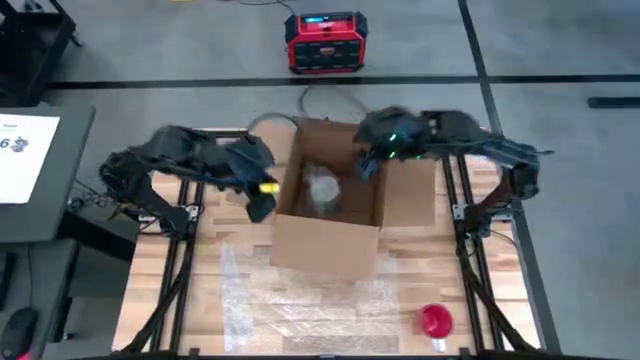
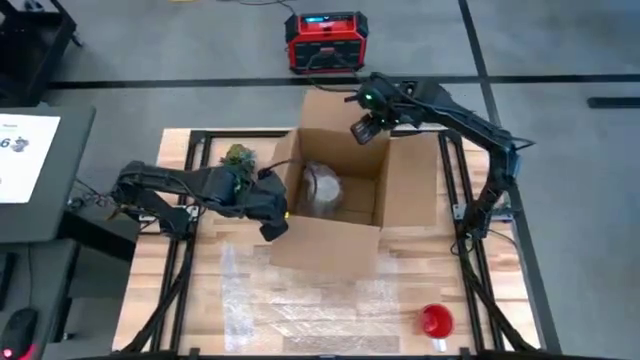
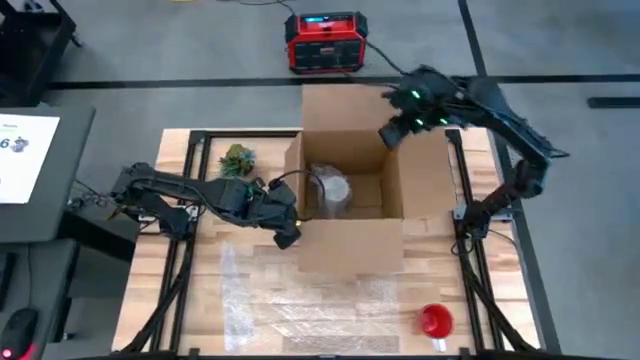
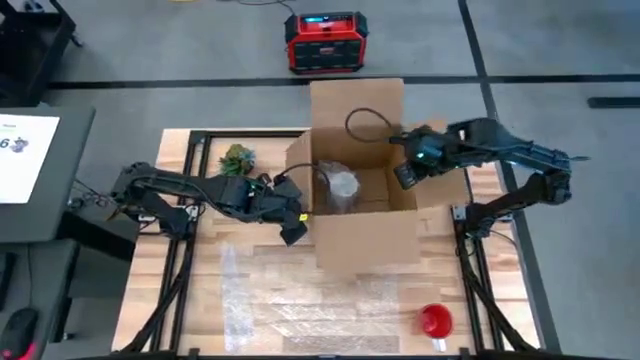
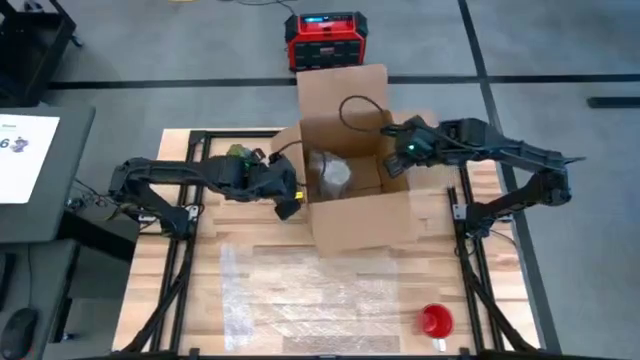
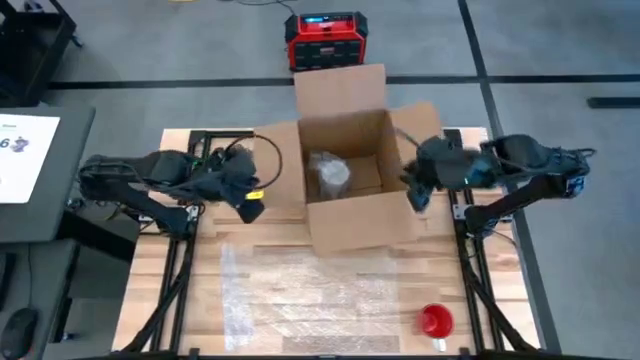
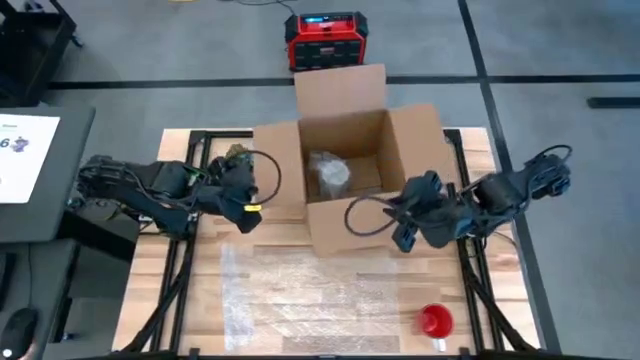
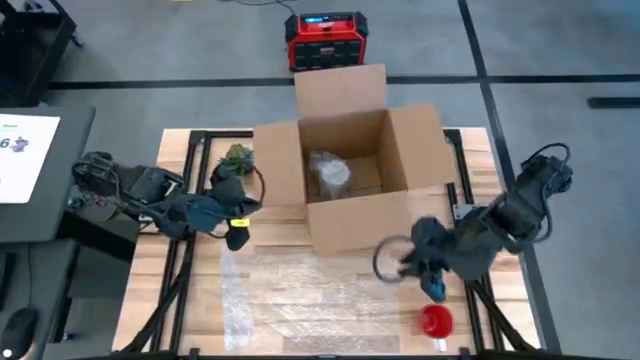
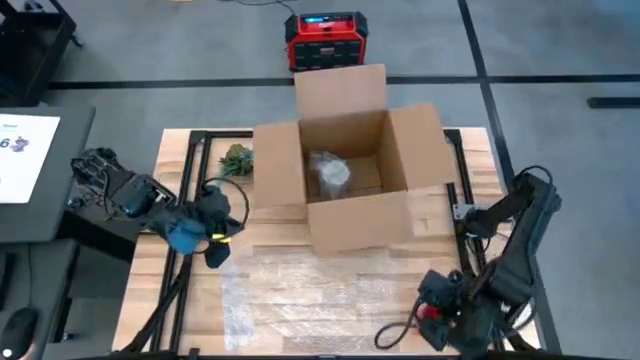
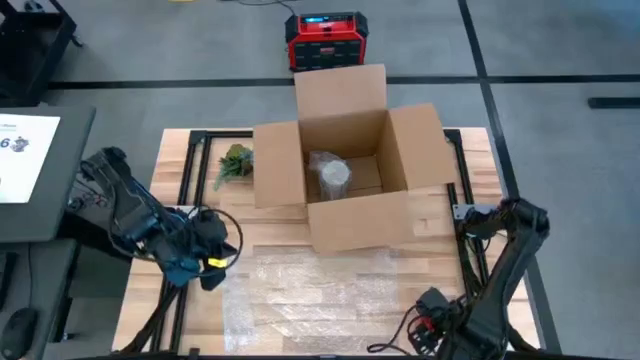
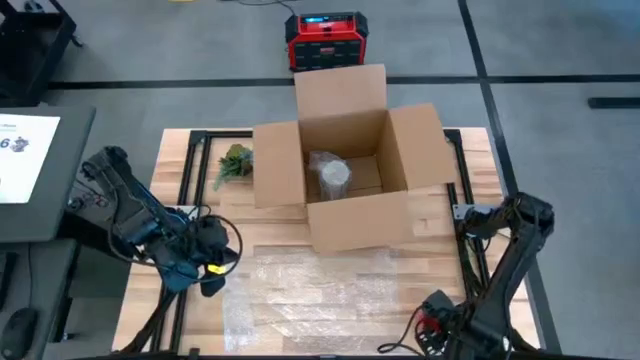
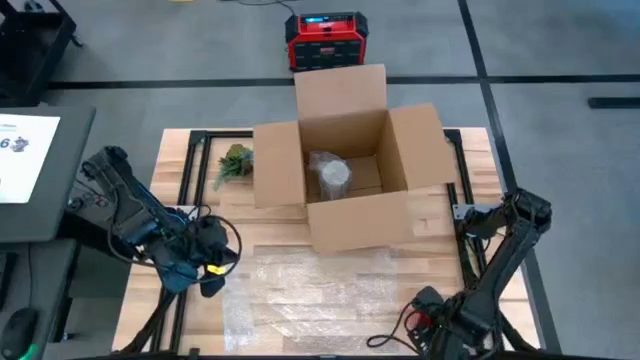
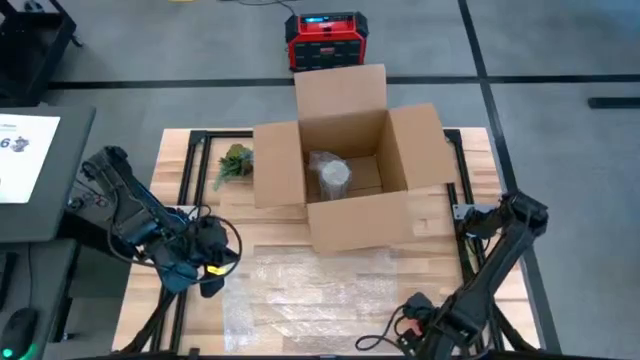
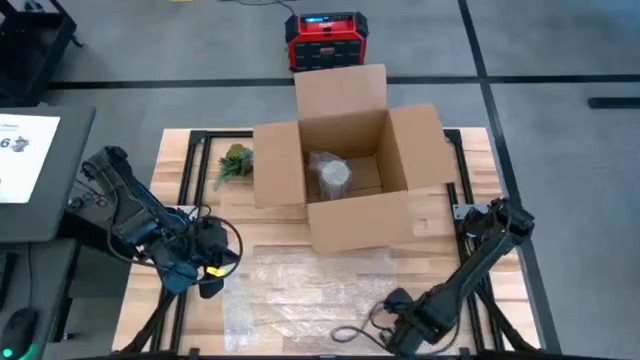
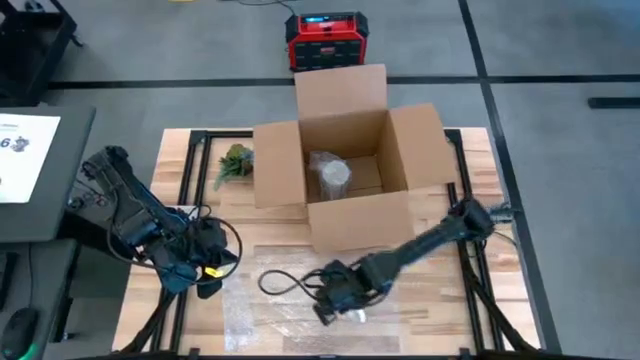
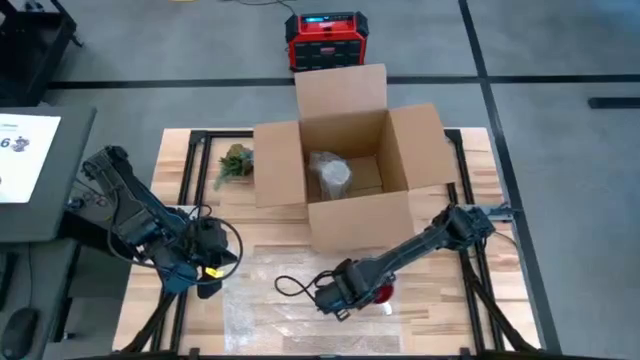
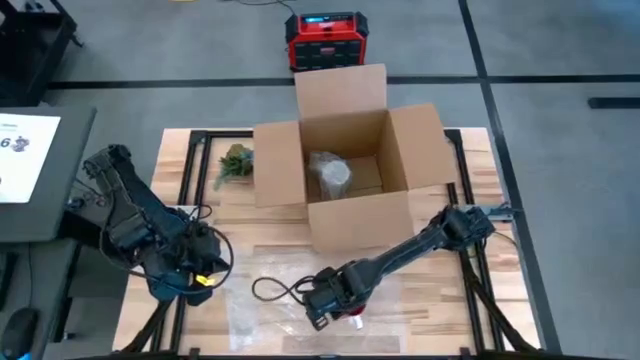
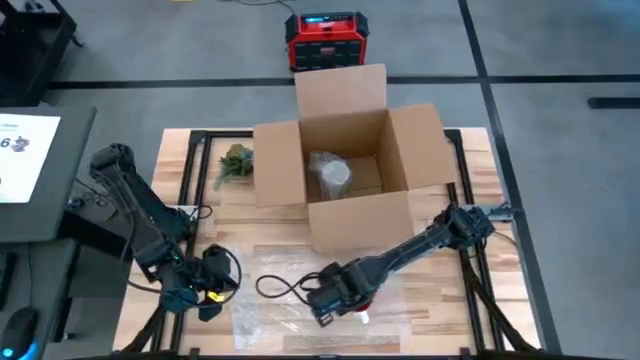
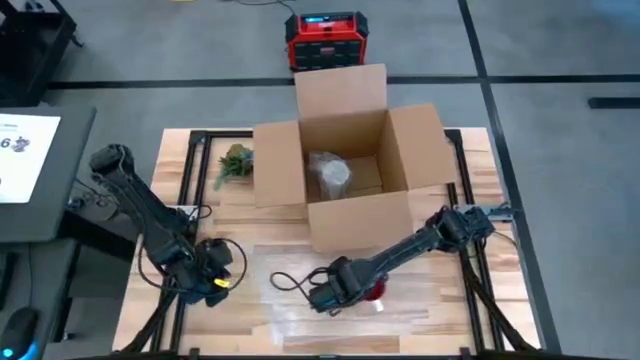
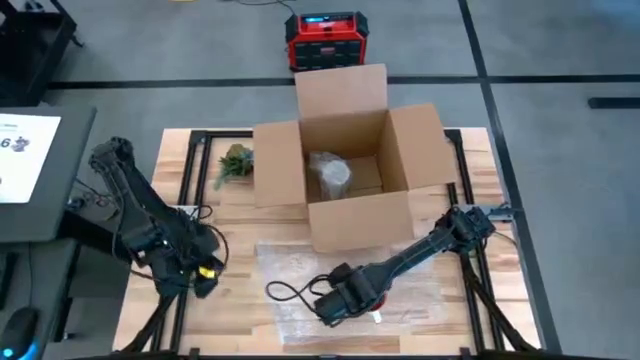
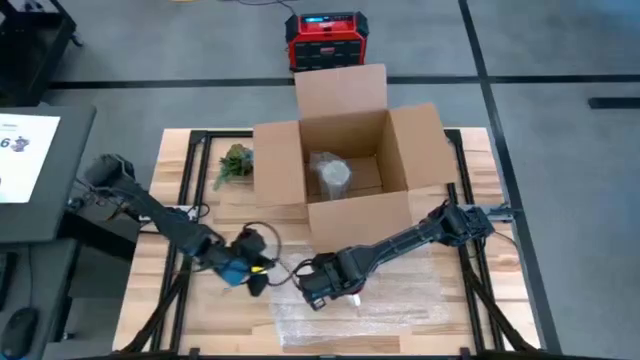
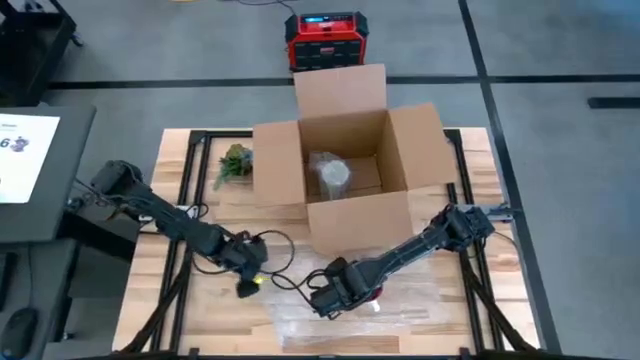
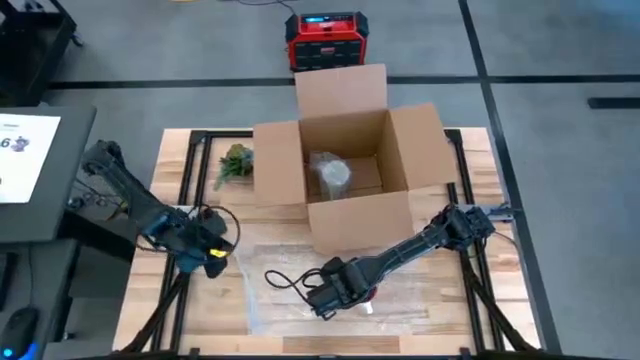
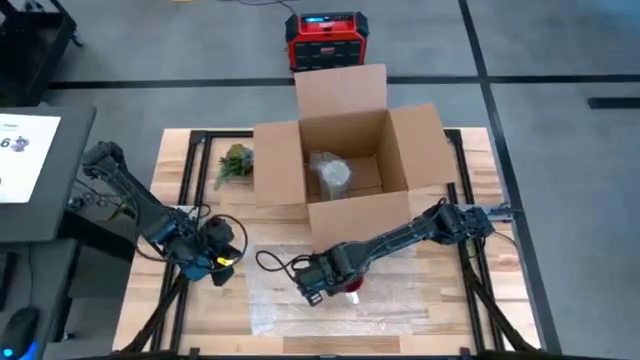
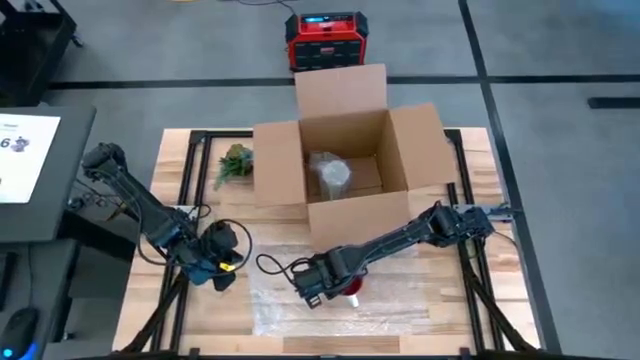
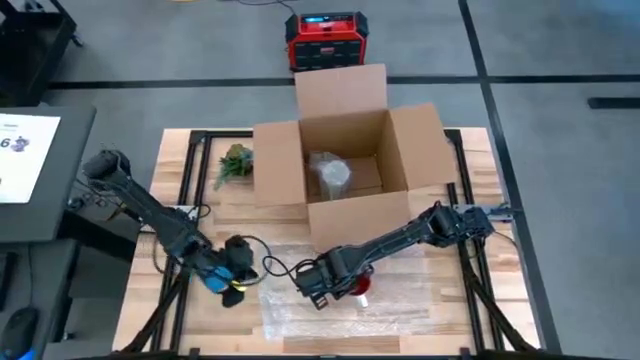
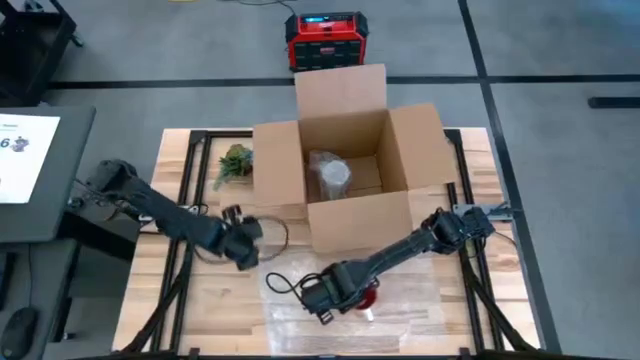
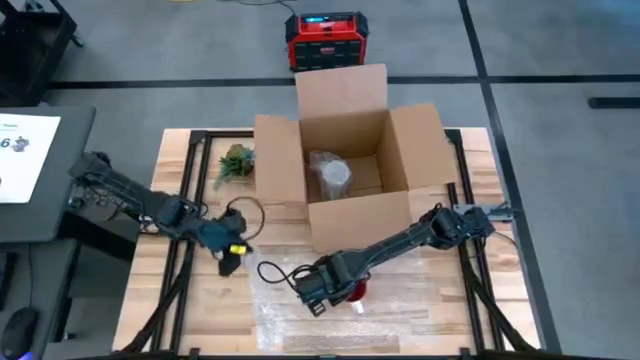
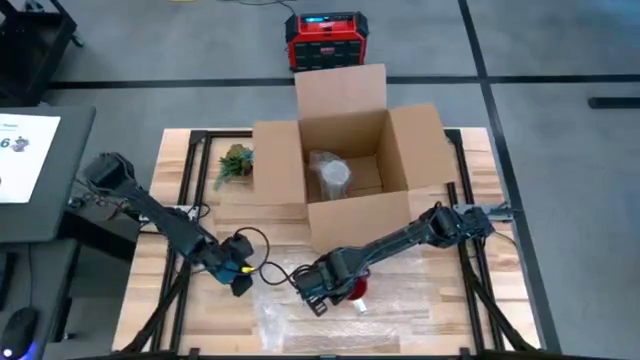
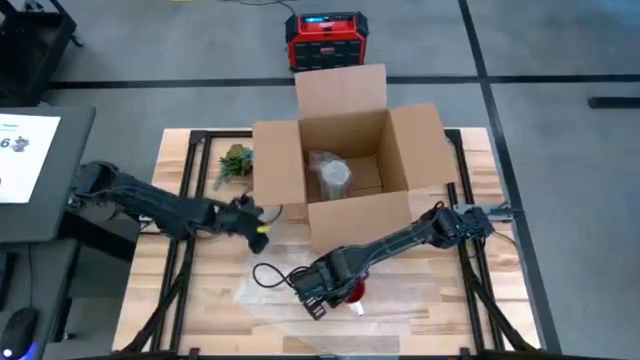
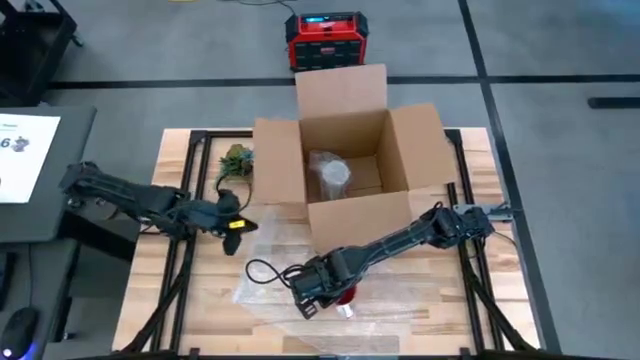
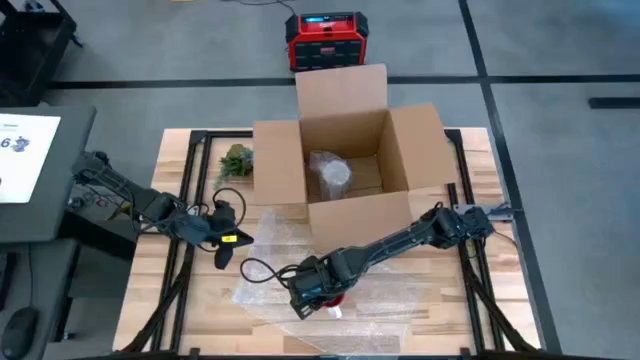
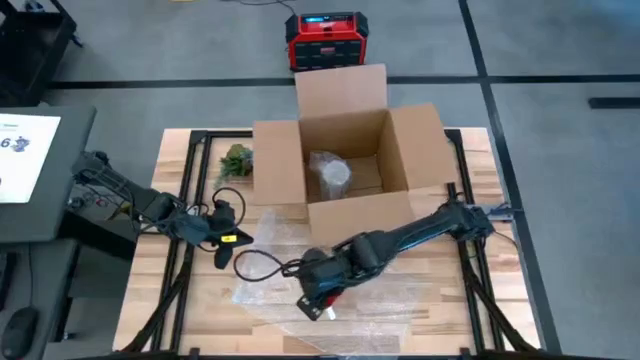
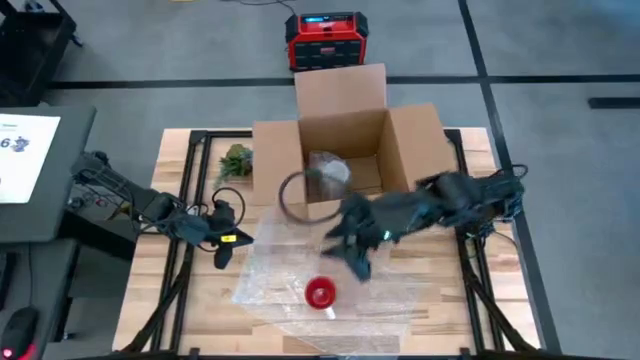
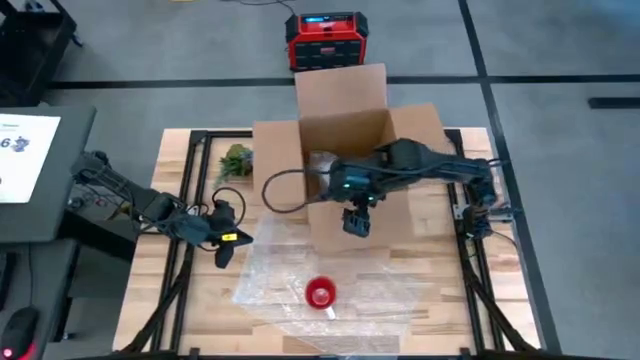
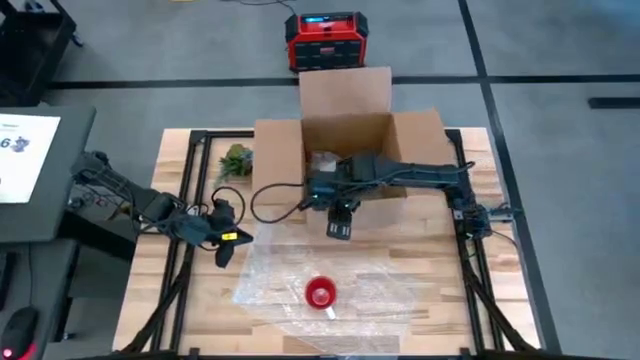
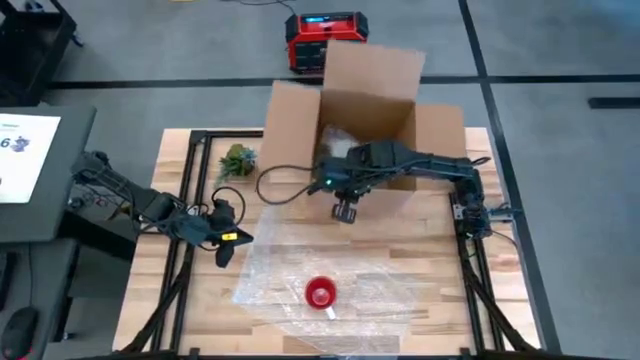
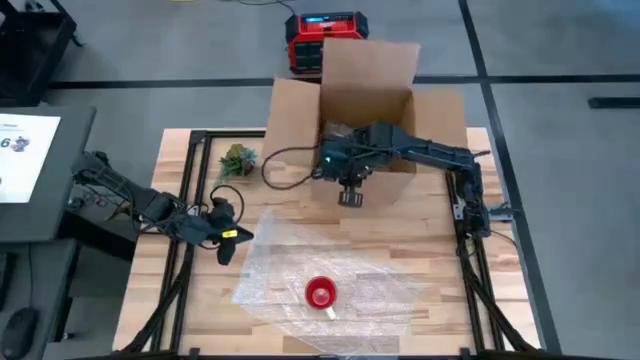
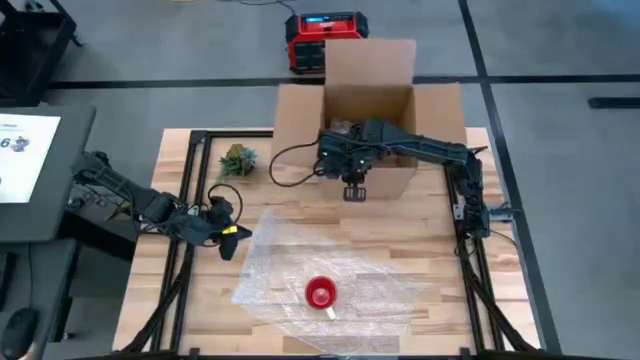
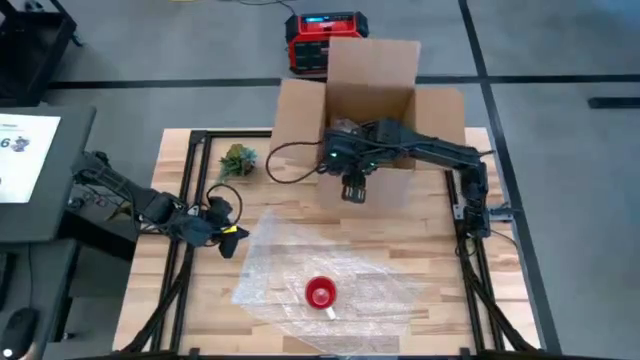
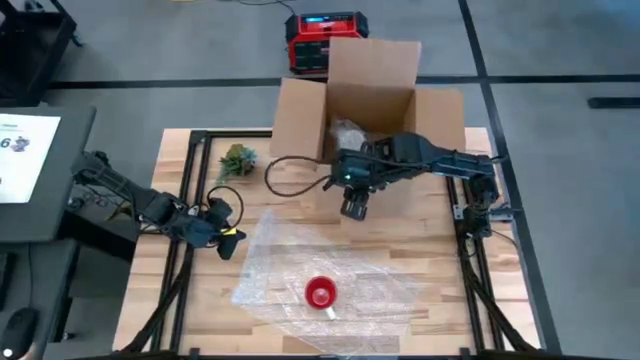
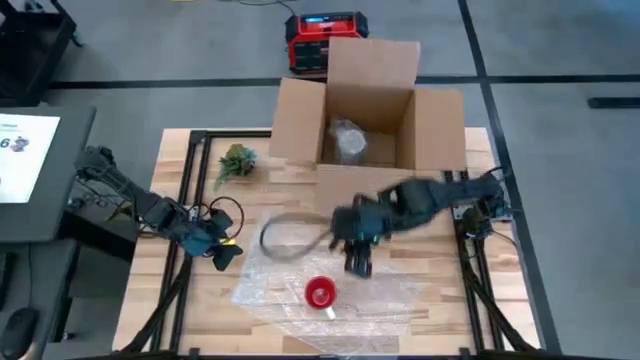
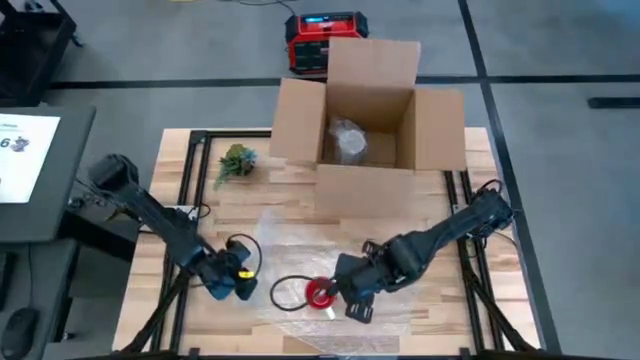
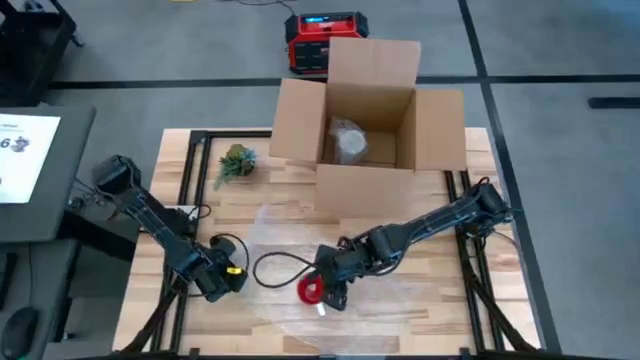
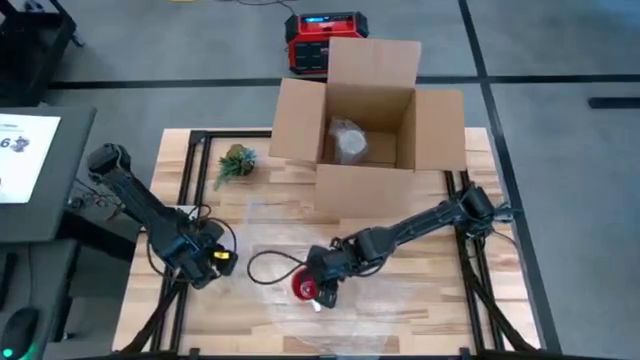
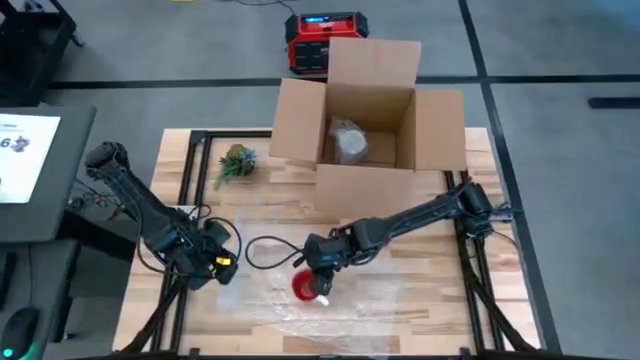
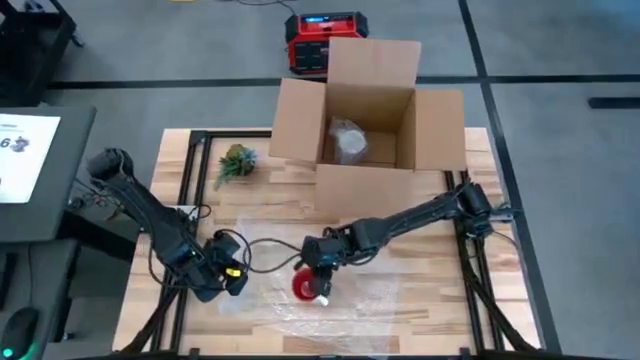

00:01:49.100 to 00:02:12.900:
Task: wrap mug
Wrap the red mug in the bubble wrap
